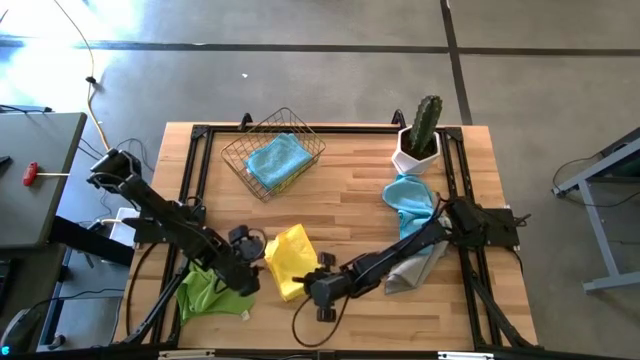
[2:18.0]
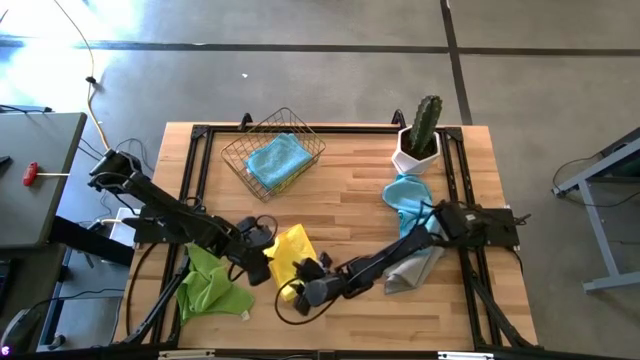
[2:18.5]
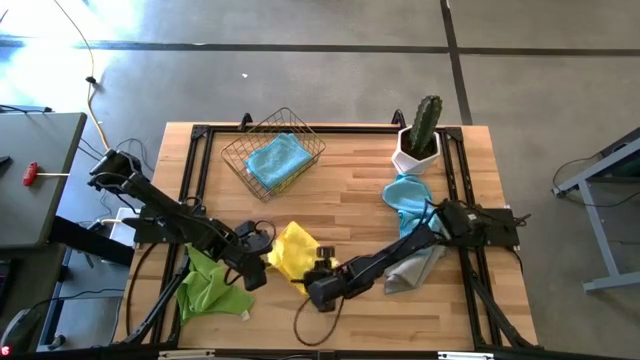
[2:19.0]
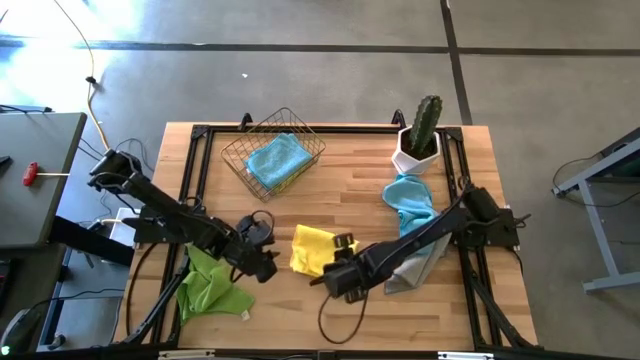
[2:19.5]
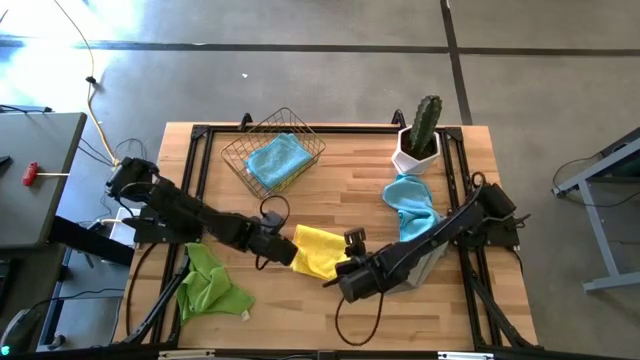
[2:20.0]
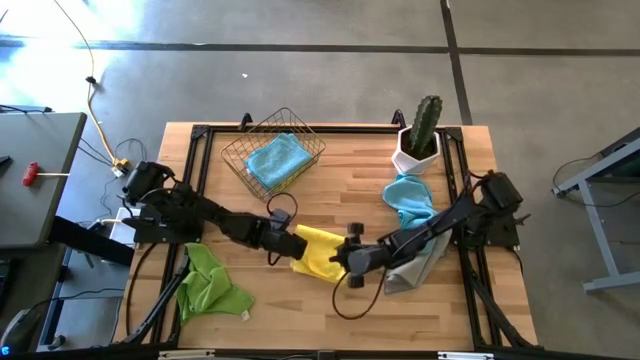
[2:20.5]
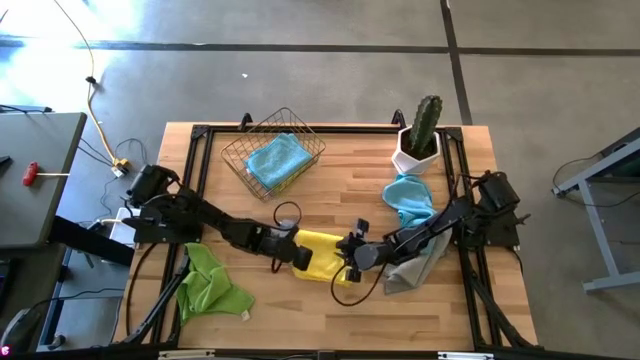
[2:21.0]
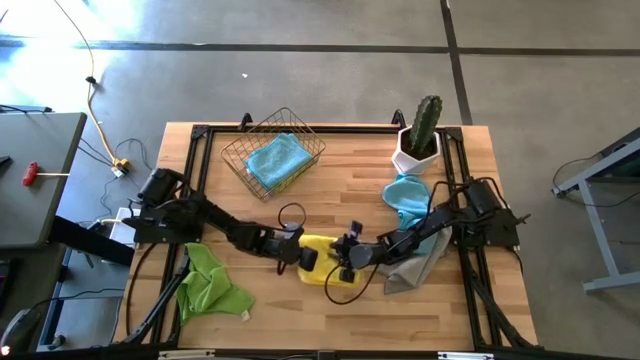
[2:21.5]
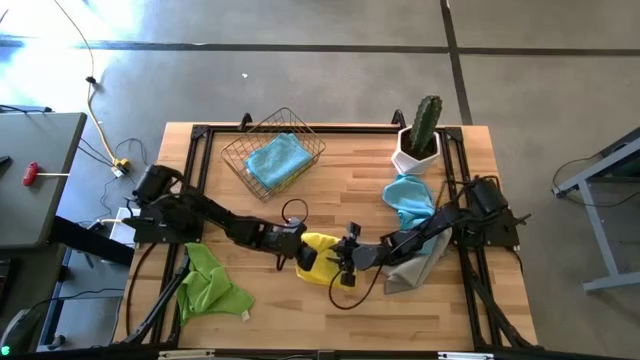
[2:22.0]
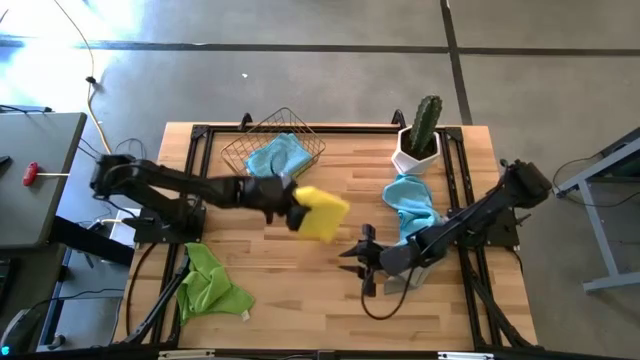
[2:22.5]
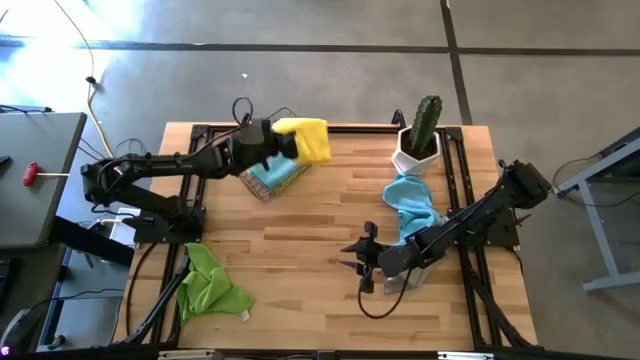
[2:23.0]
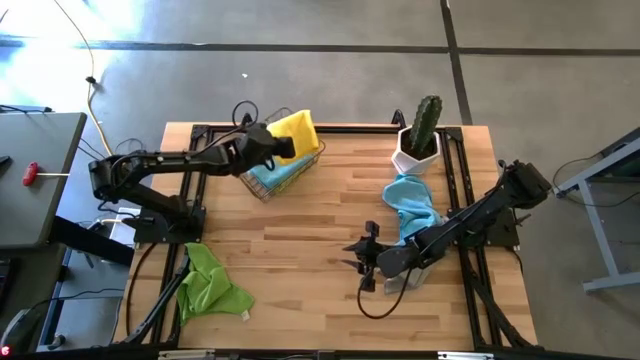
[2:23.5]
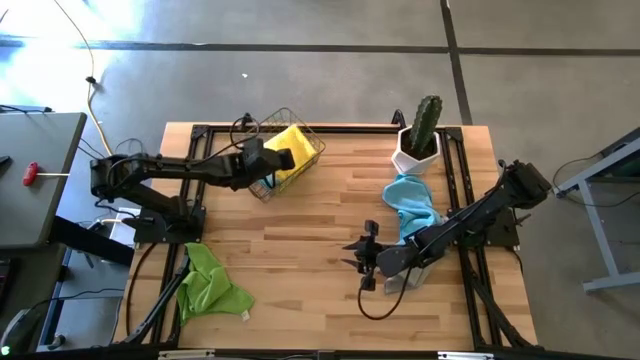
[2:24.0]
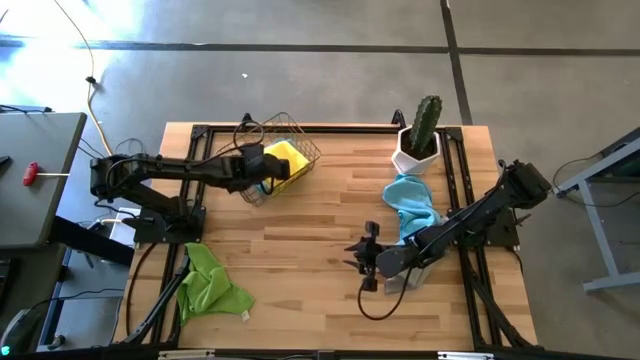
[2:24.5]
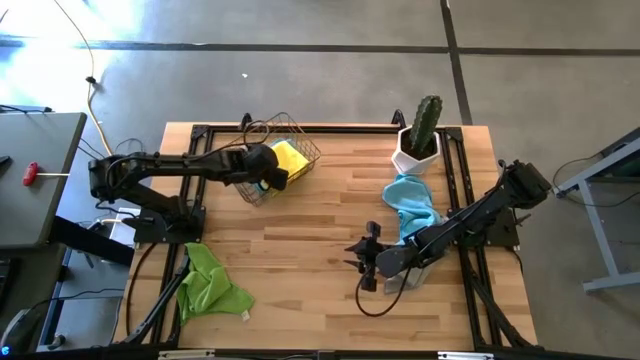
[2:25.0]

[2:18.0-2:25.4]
Task: Fold microfiber towels
Put the folded yellow microfiber towel into the wire basket

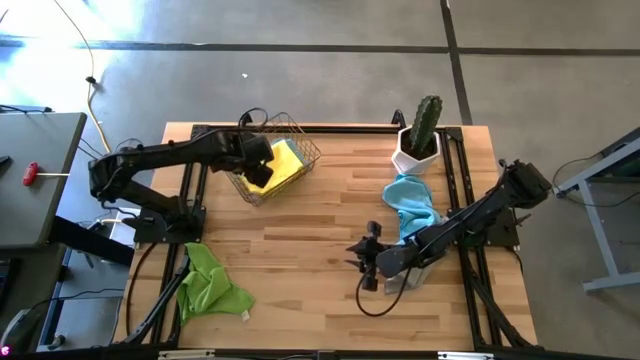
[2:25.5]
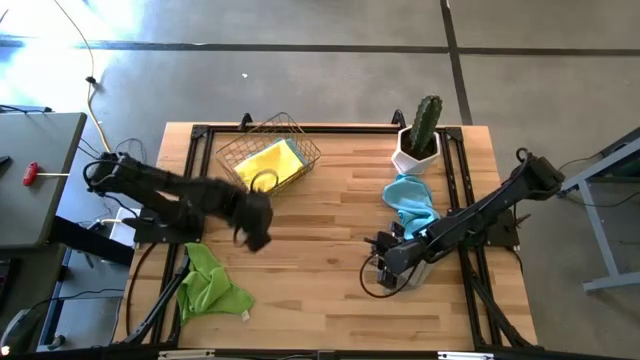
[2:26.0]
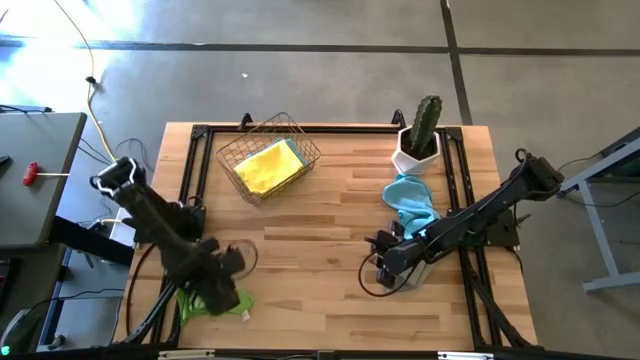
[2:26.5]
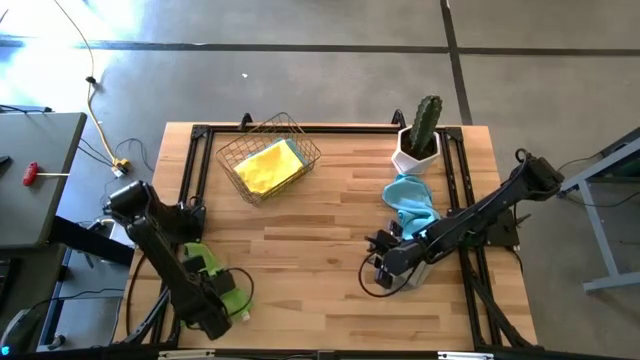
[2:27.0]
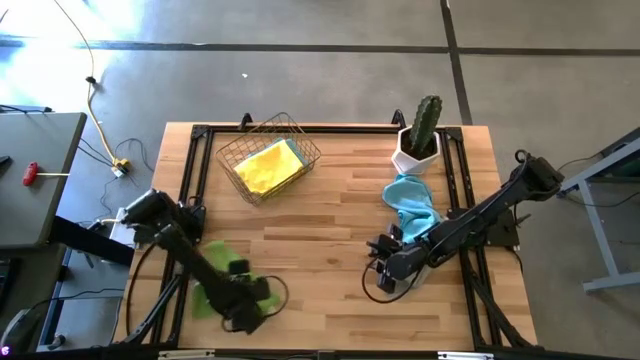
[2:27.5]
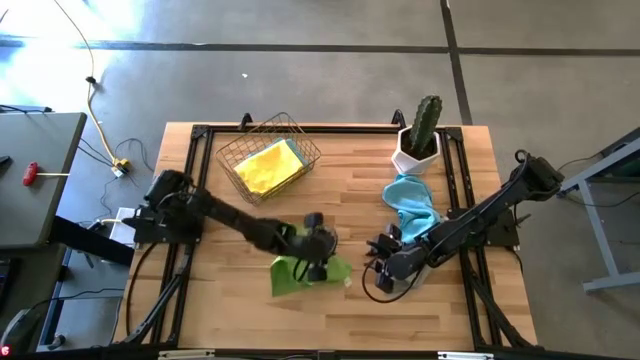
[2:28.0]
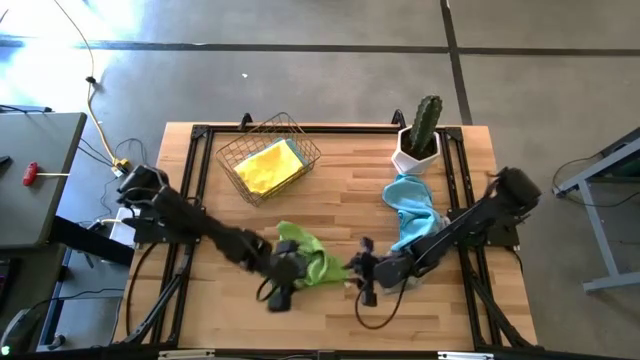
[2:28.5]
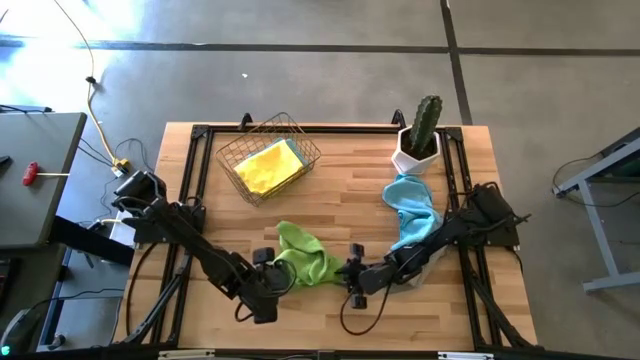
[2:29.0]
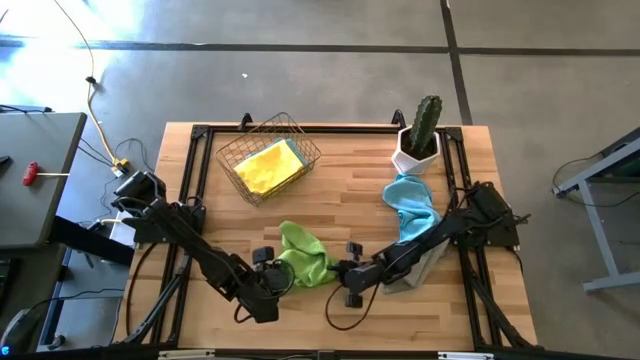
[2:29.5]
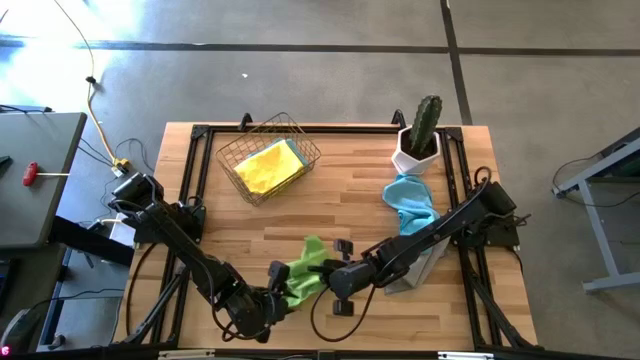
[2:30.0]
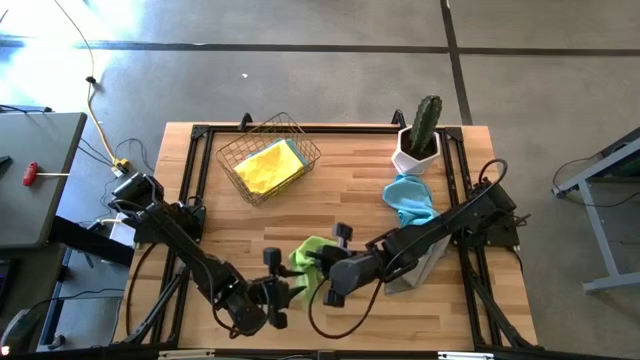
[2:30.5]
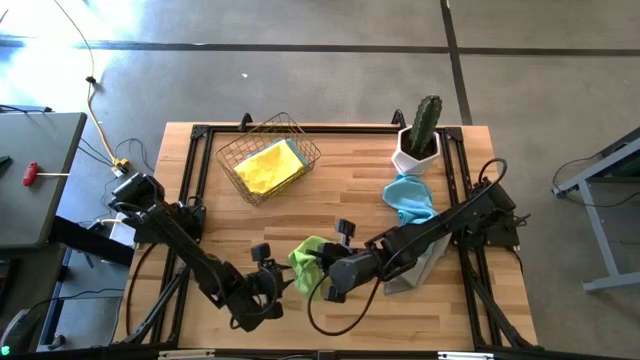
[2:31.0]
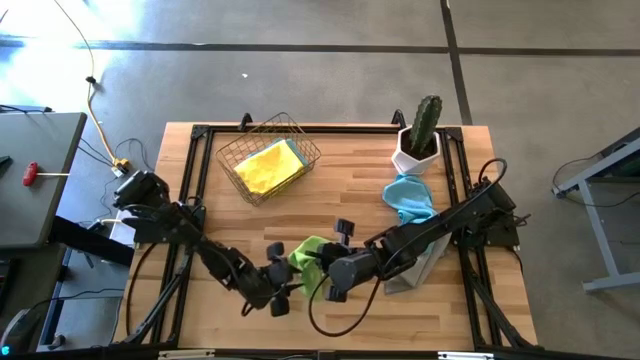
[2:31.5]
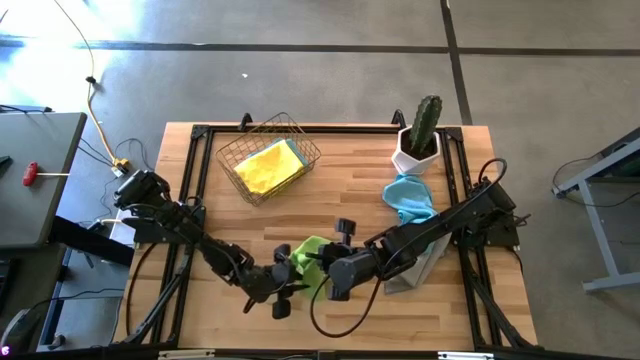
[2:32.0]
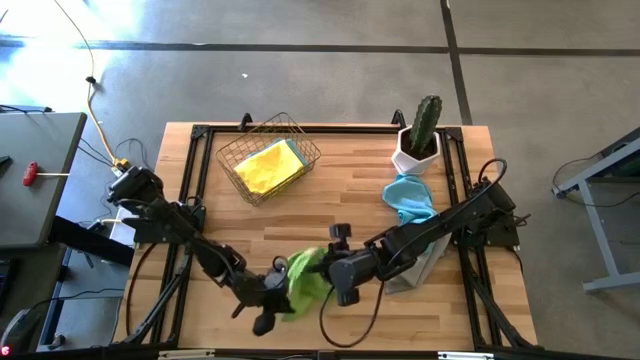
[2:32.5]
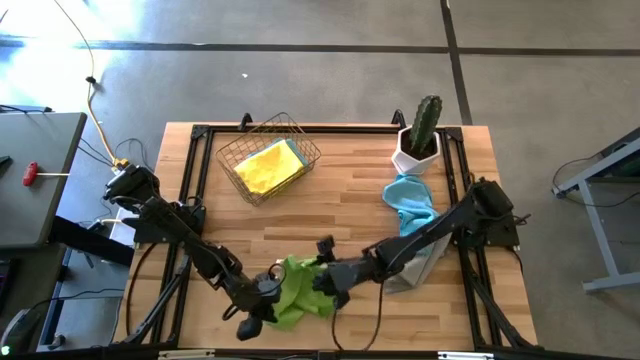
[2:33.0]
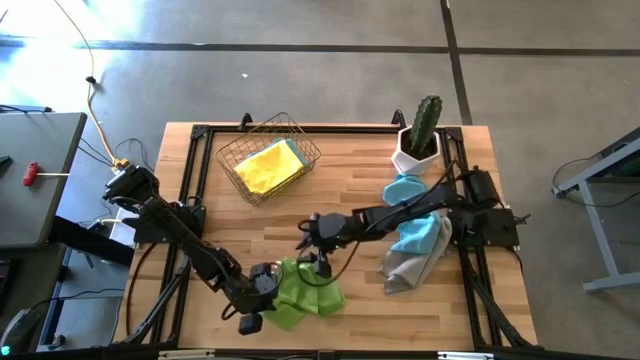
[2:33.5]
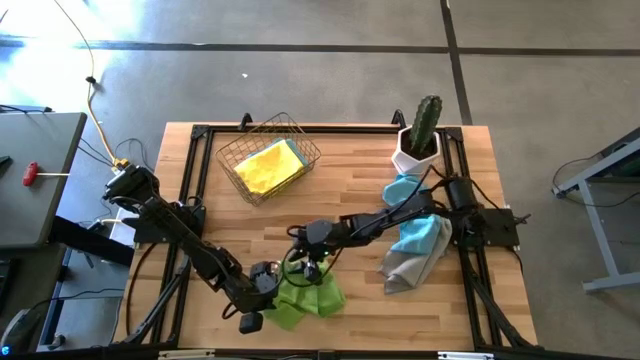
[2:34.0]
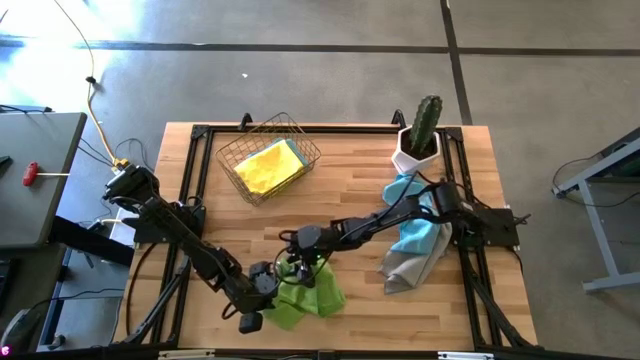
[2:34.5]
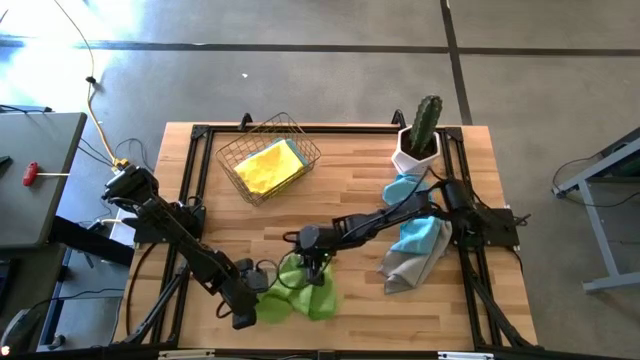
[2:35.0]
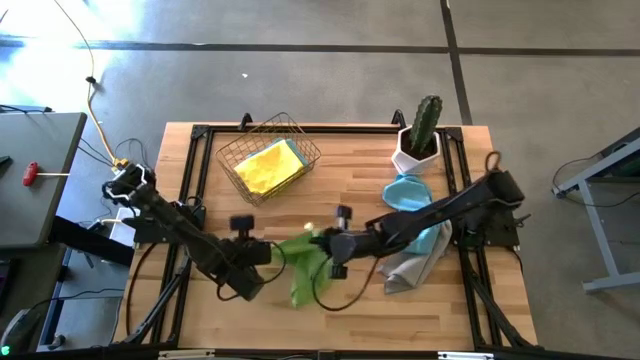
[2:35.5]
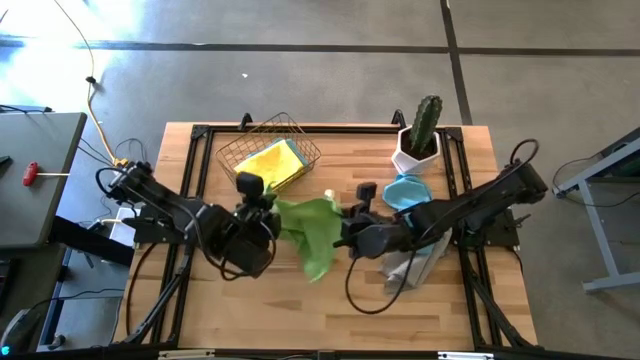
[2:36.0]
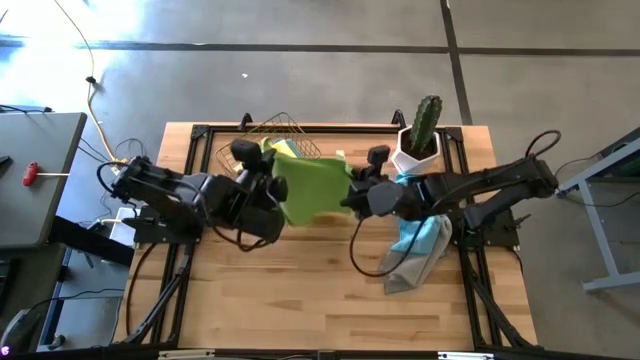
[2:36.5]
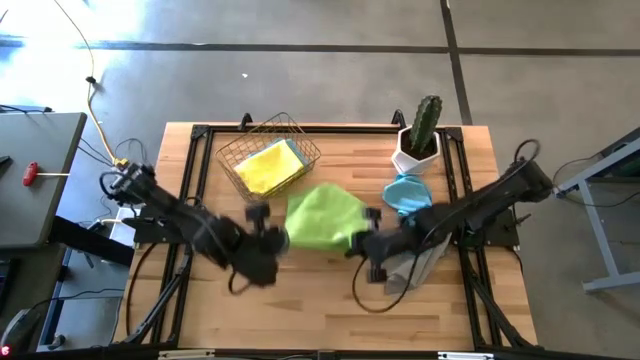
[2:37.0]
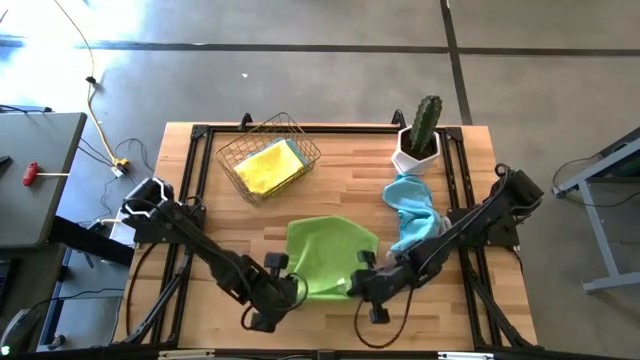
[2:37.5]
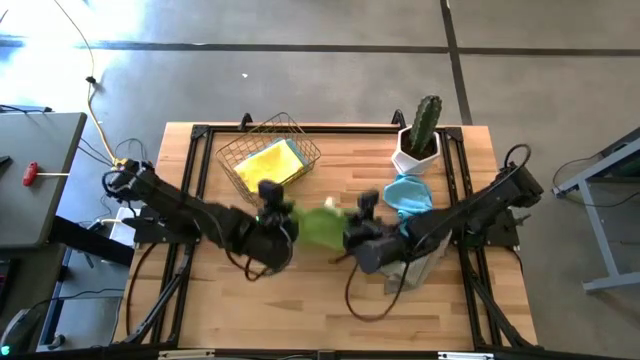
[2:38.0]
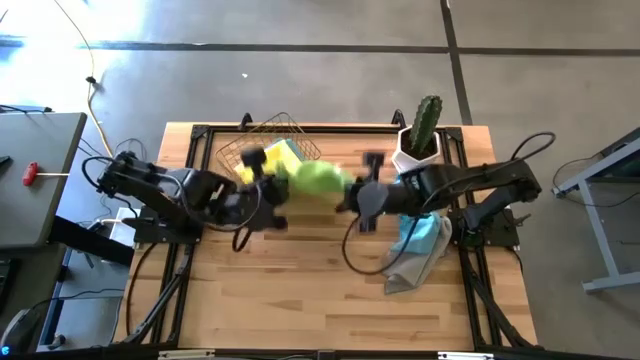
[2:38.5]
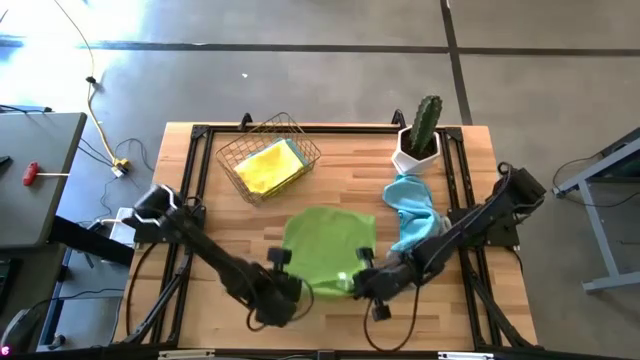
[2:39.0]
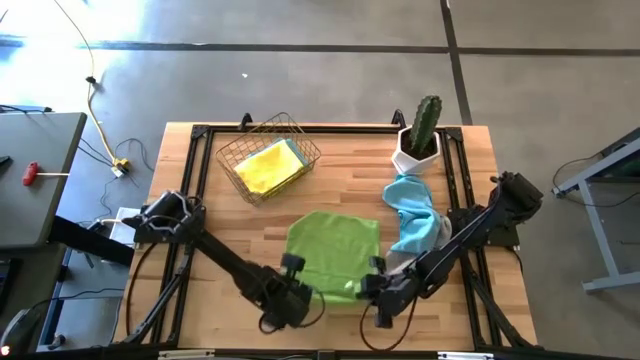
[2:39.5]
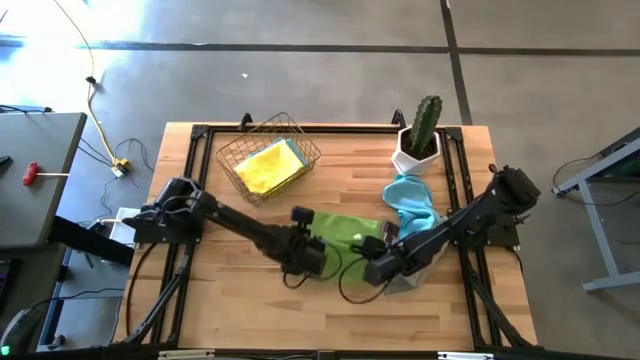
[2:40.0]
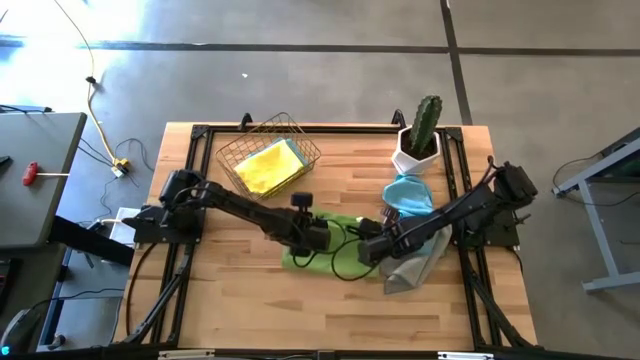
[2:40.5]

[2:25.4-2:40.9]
Fold the green microfiber towel
